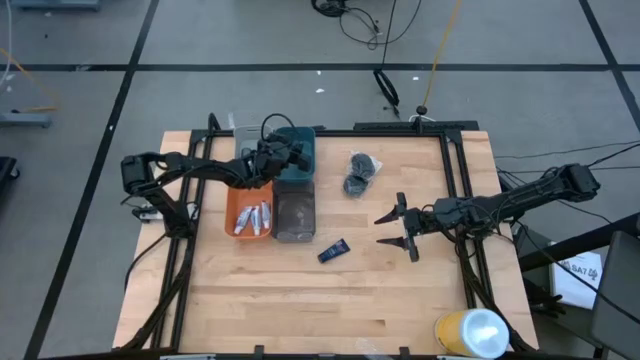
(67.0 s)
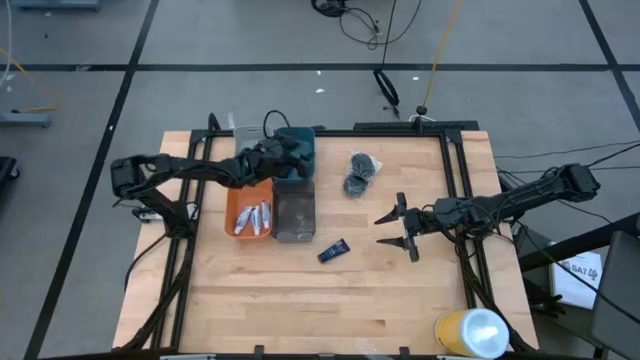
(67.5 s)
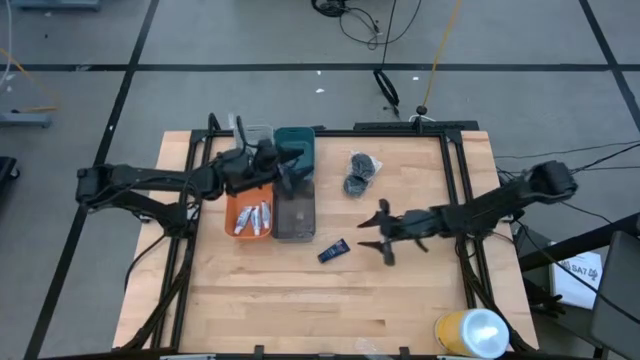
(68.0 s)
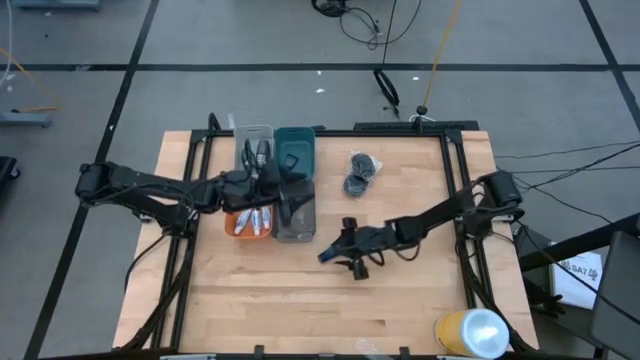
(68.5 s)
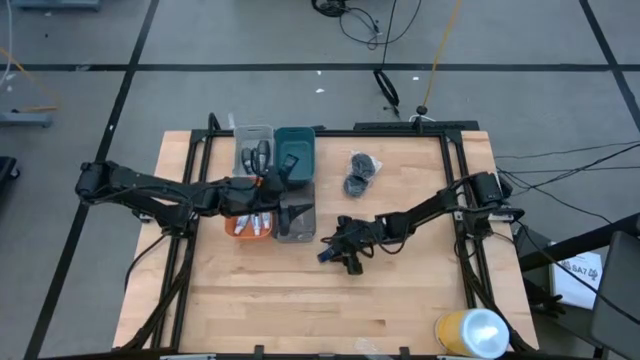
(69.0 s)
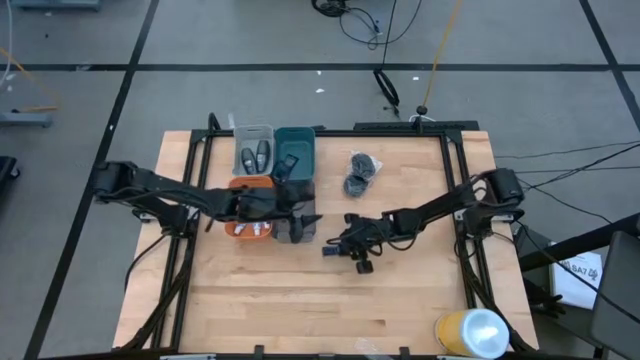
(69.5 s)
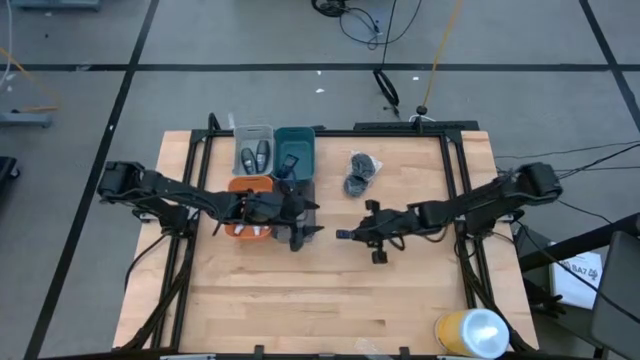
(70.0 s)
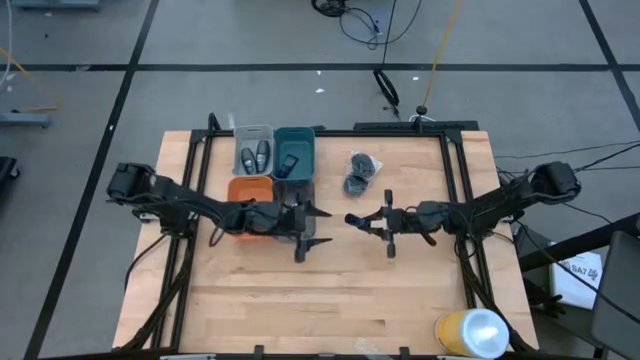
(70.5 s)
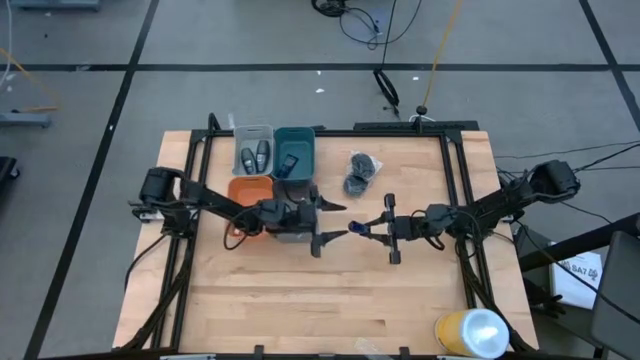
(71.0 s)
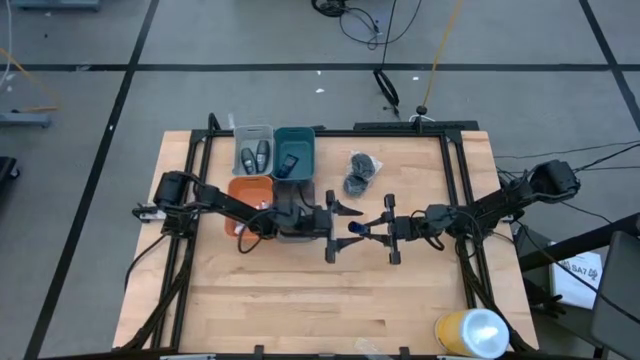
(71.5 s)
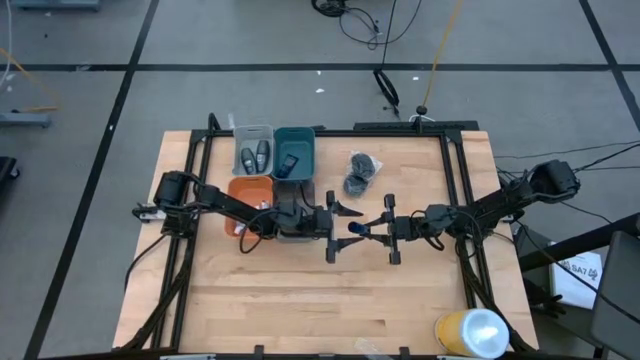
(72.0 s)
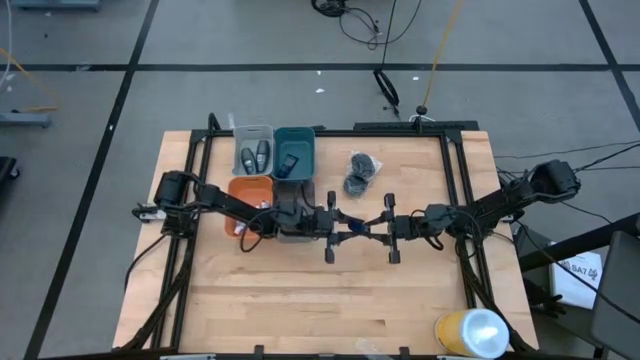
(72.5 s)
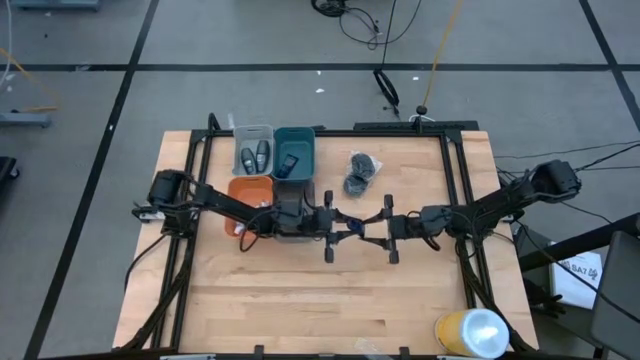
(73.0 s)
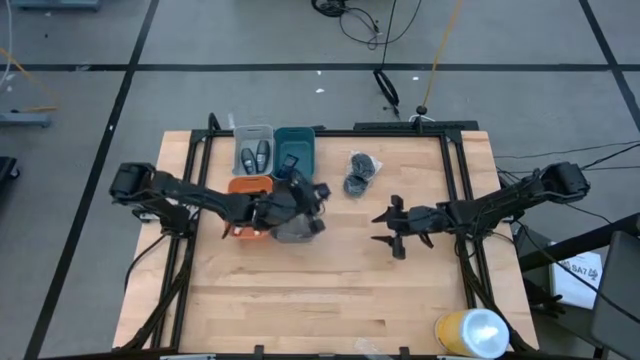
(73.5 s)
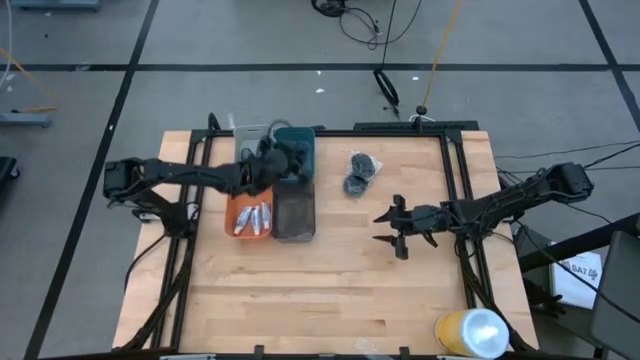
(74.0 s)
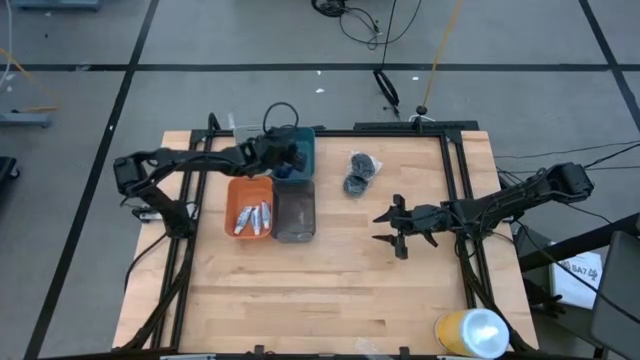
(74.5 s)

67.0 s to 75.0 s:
Task: Pick & Place Travel size toiletries
Put the blue shave cream into the blue bin

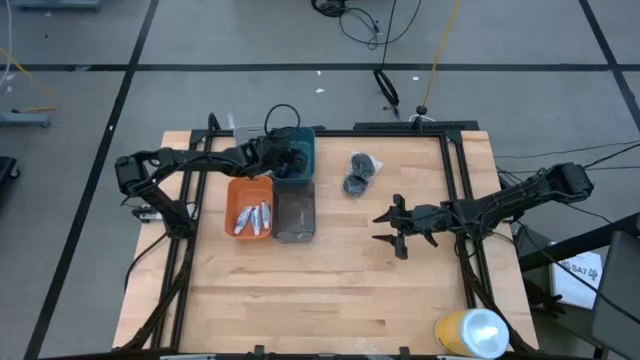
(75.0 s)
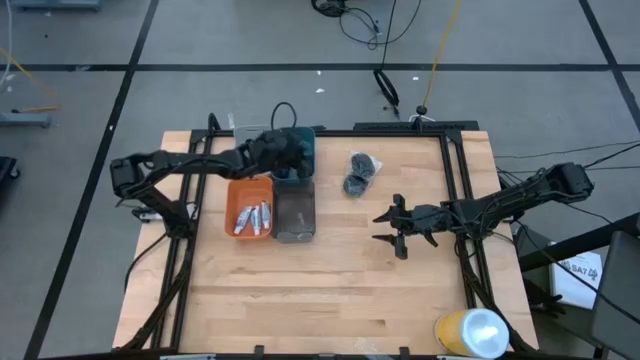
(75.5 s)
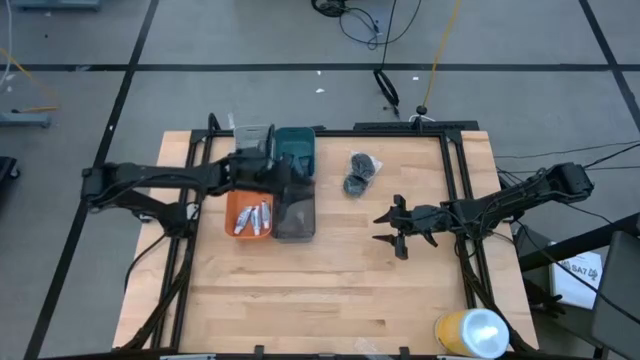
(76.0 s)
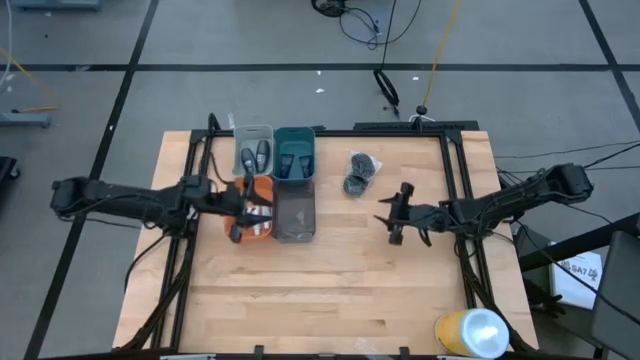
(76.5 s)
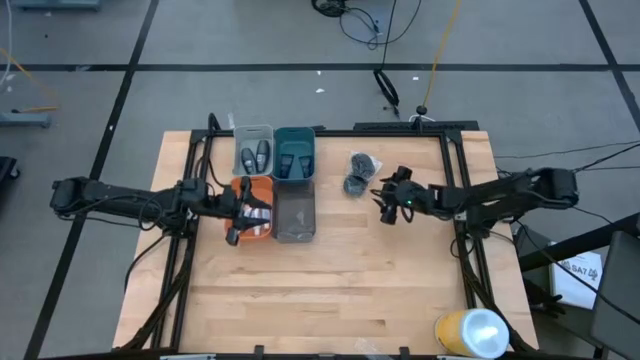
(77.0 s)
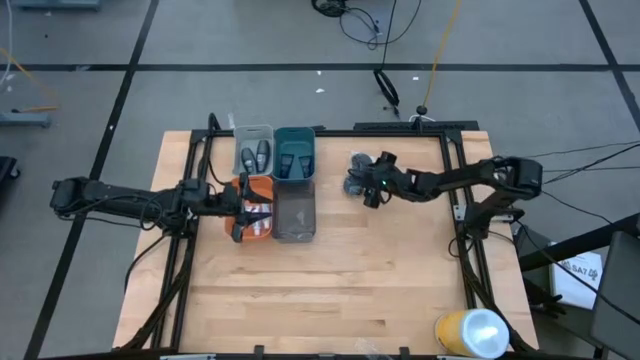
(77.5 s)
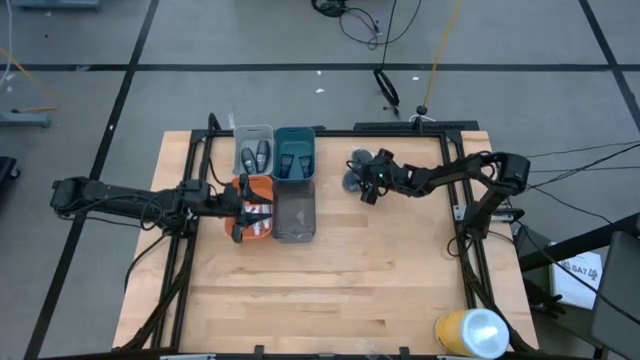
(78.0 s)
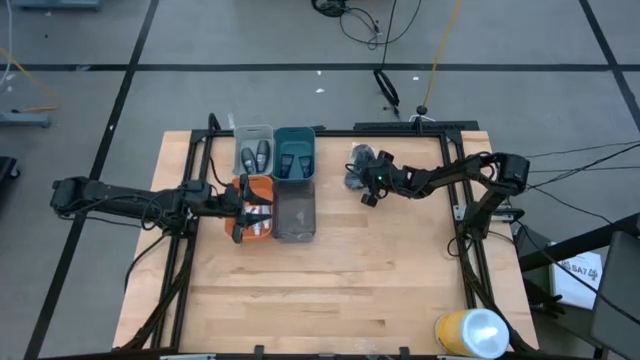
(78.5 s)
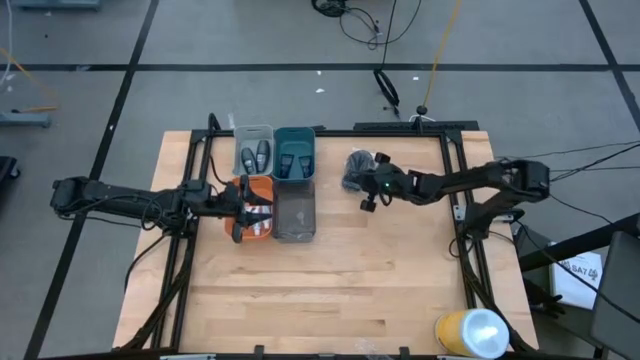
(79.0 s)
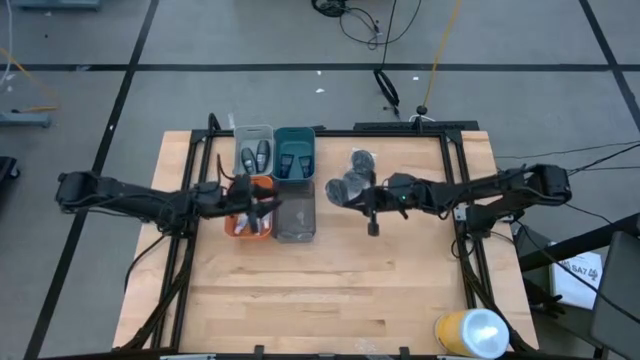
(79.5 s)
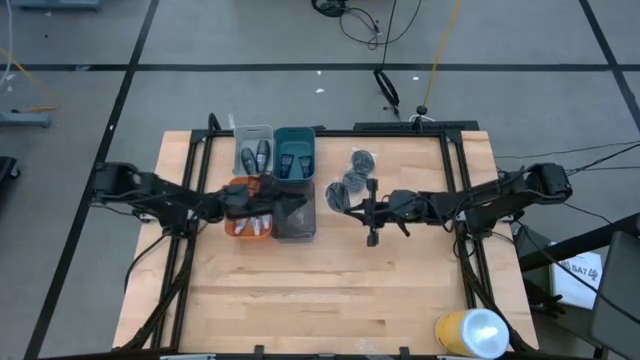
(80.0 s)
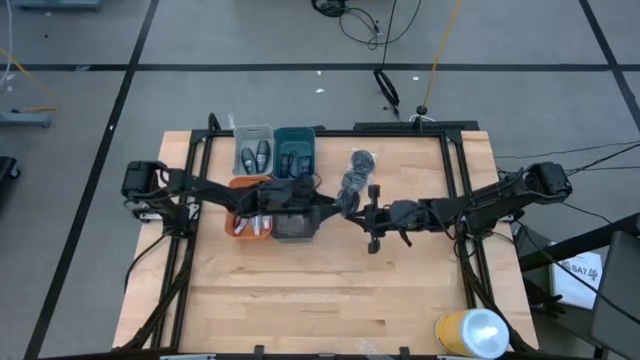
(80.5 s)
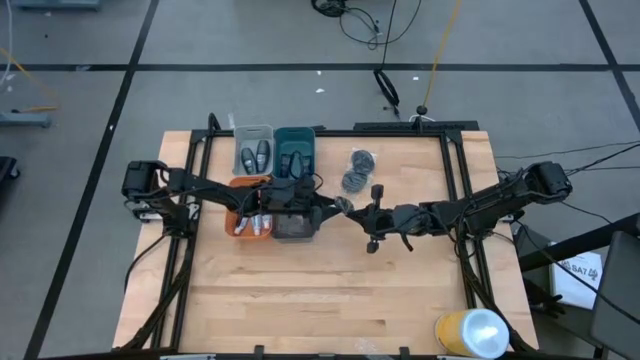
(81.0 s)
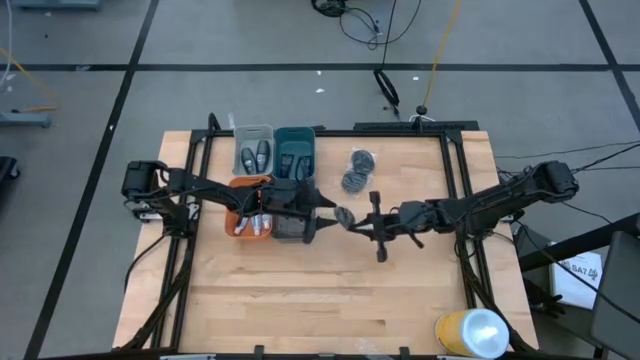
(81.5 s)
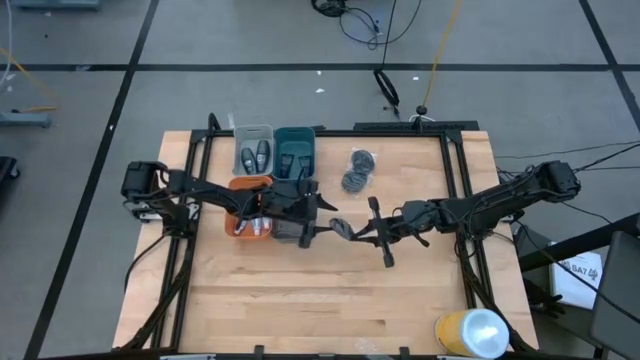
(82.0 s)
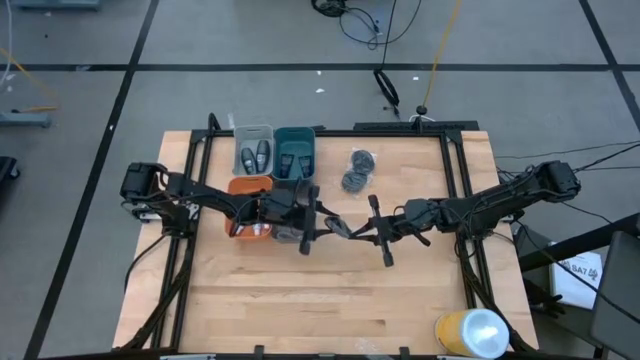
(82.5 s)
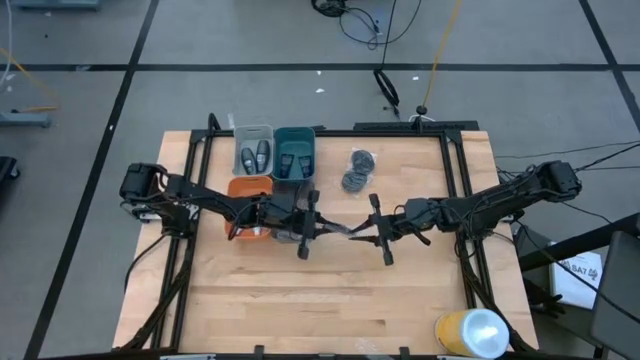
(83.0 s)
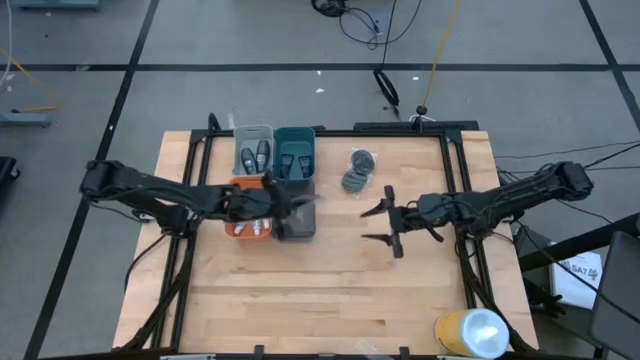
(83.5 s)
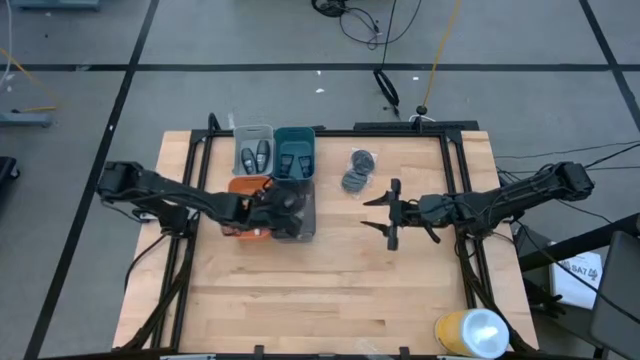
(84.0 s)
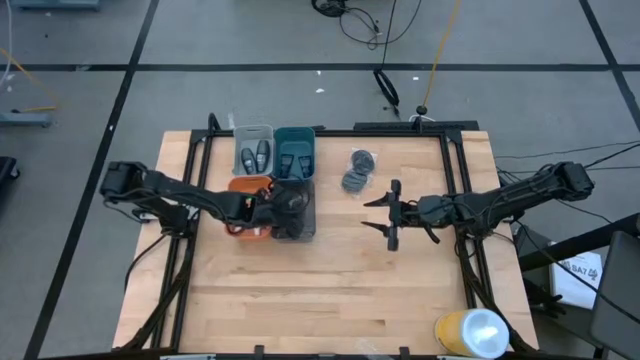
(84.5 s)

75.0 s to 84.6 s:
Put the top black hairbrush into the black bin

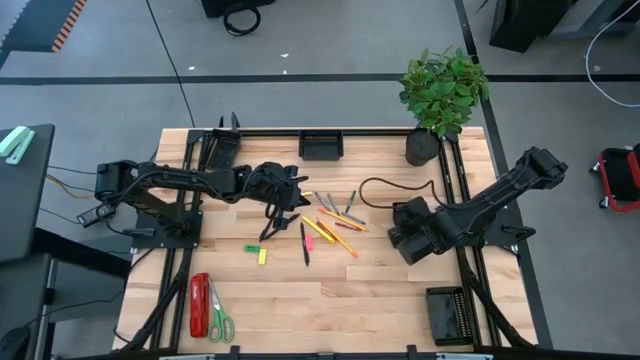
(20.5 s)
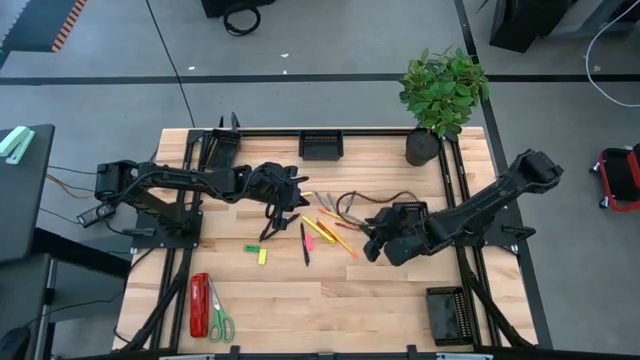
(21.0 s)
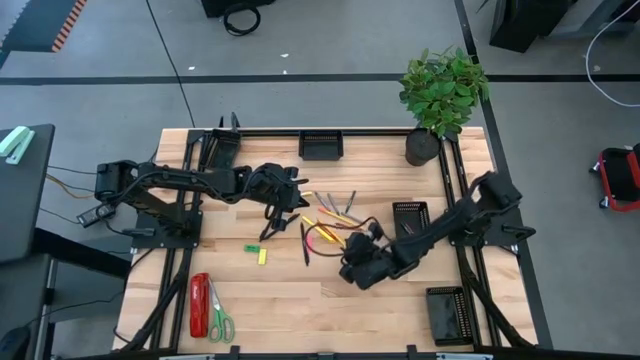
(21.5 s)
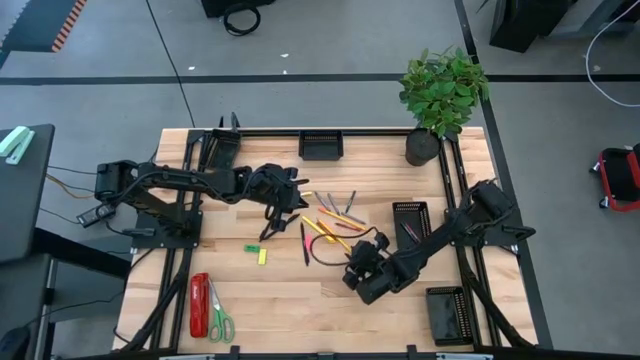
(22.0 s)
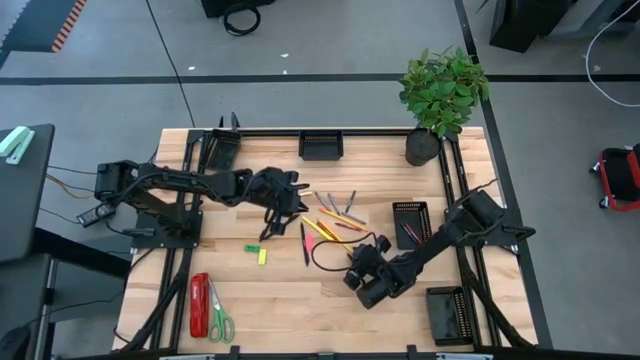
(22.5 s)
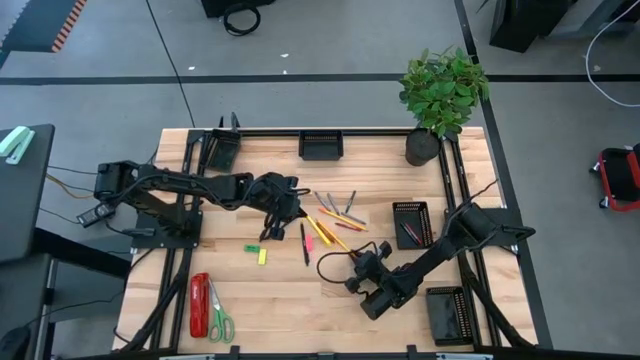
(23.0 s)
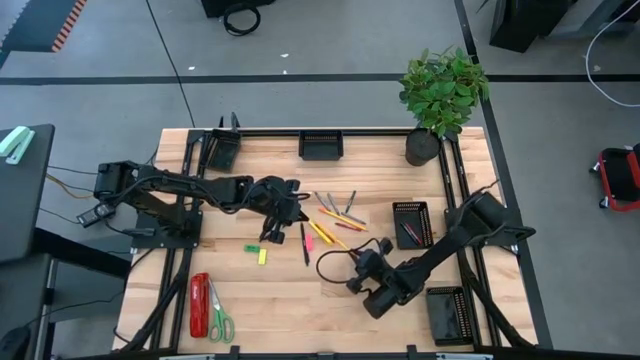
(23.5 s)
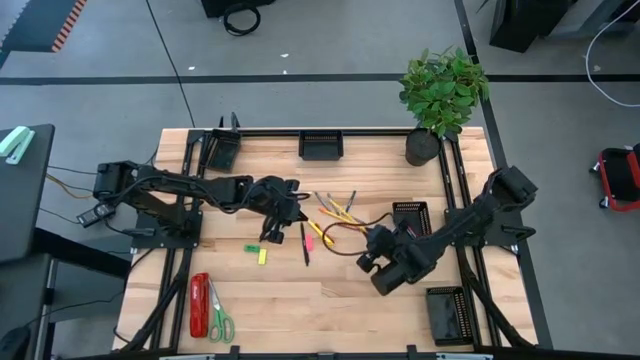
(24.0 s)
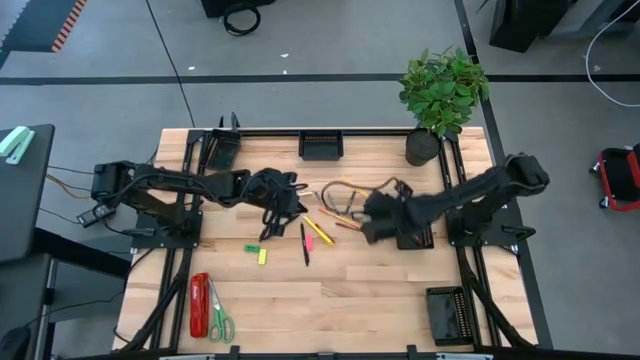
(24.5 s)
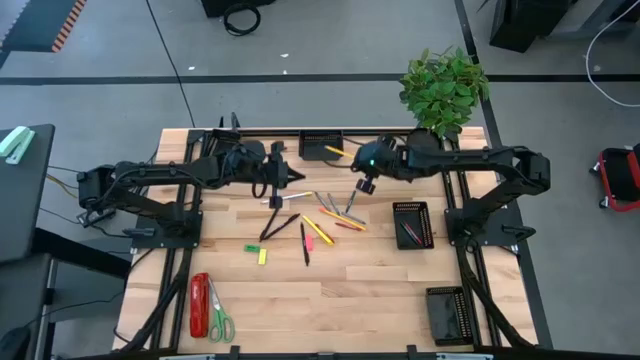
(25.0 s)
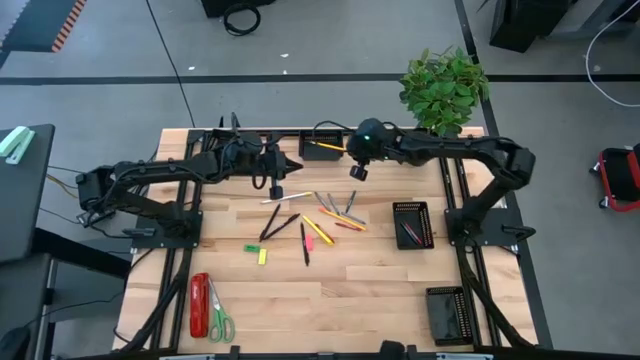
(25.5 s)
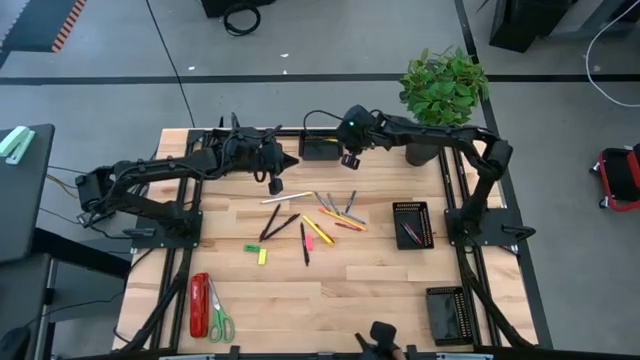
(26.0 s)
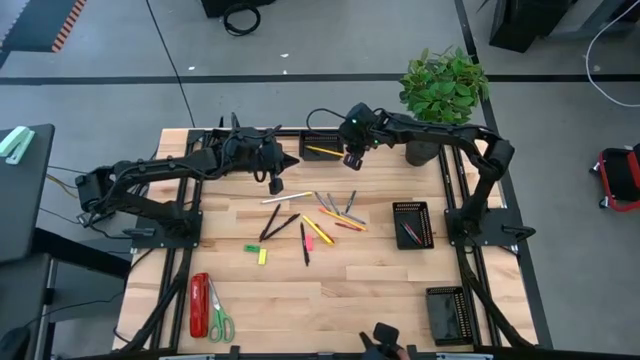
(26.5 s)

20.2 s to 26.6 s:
Task: Sort crayons/erasers/pens/pencils in bins
Put the yellow pencil into the top right black bin
